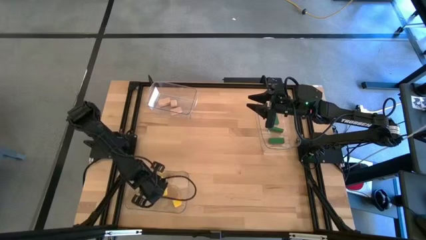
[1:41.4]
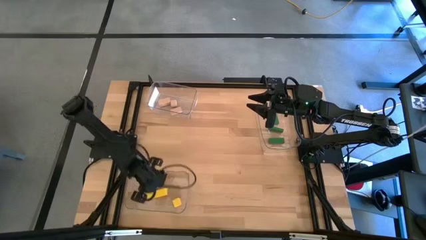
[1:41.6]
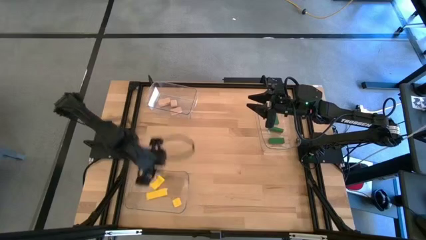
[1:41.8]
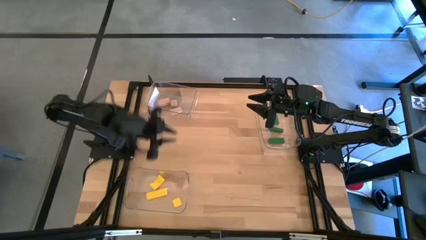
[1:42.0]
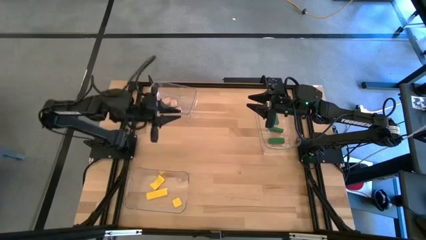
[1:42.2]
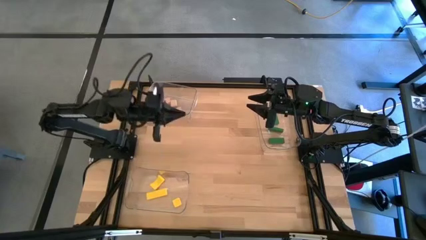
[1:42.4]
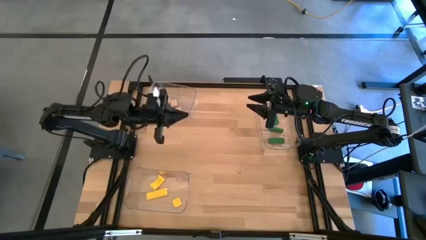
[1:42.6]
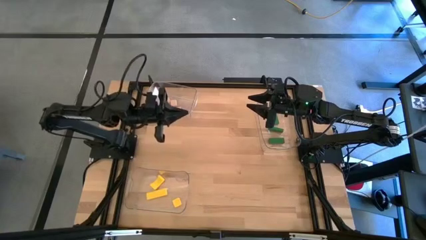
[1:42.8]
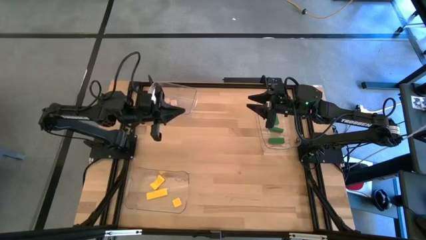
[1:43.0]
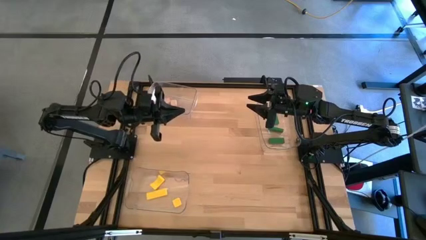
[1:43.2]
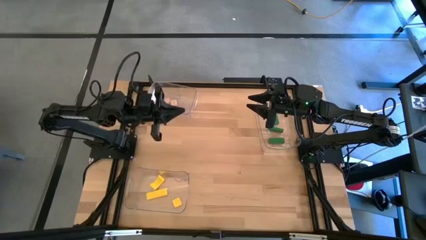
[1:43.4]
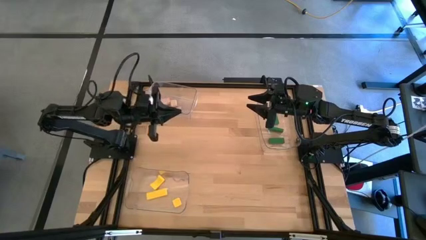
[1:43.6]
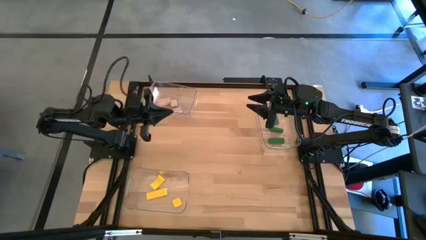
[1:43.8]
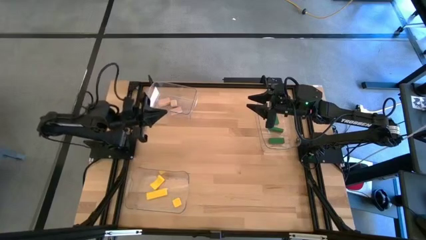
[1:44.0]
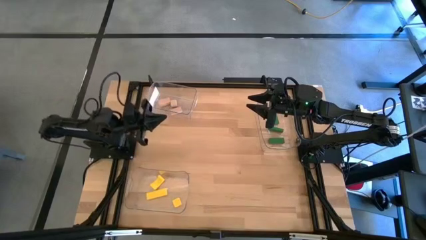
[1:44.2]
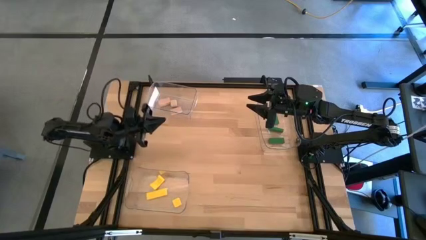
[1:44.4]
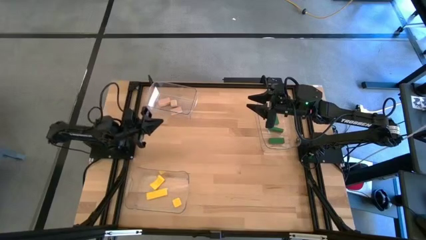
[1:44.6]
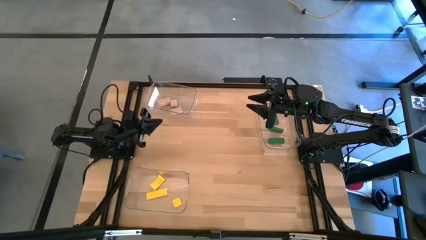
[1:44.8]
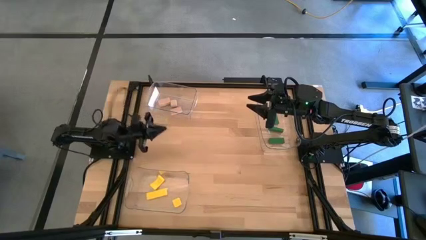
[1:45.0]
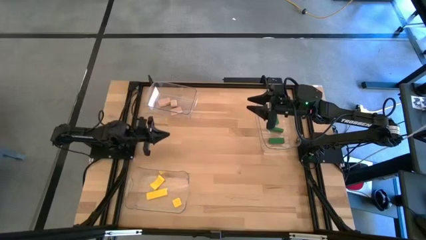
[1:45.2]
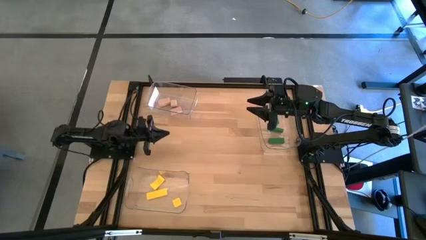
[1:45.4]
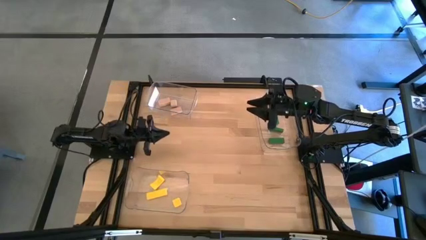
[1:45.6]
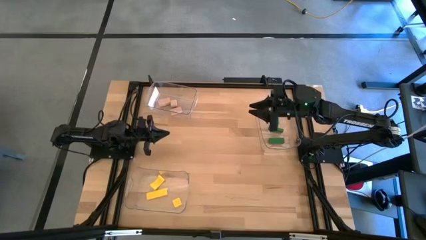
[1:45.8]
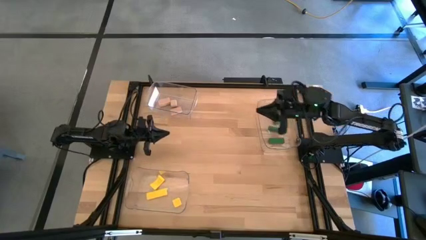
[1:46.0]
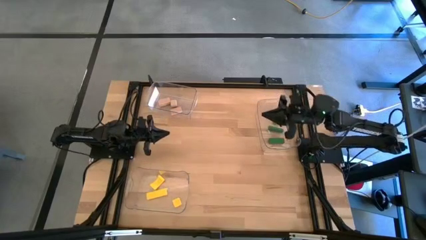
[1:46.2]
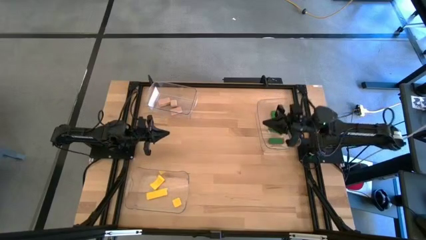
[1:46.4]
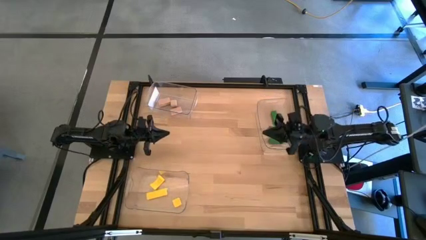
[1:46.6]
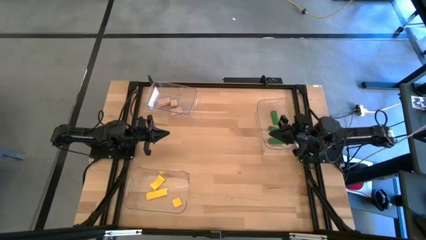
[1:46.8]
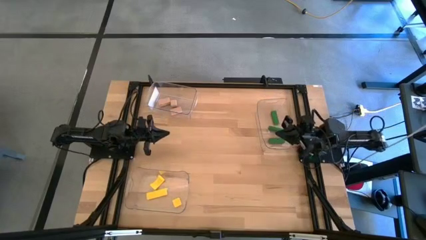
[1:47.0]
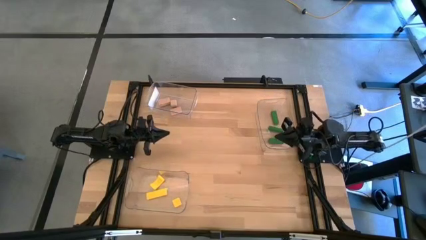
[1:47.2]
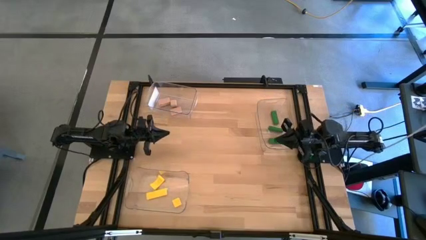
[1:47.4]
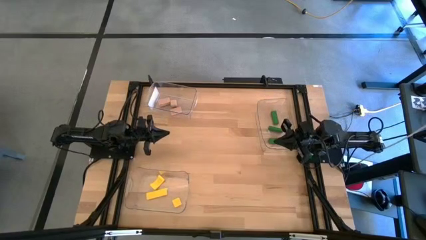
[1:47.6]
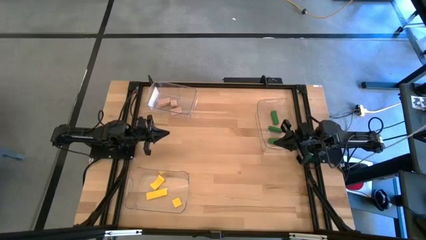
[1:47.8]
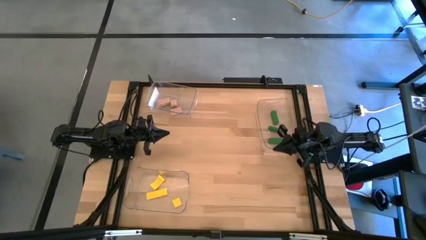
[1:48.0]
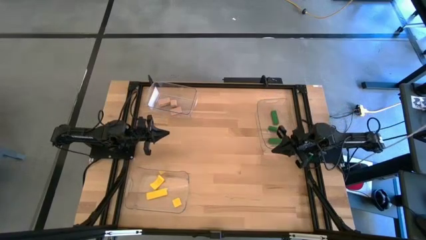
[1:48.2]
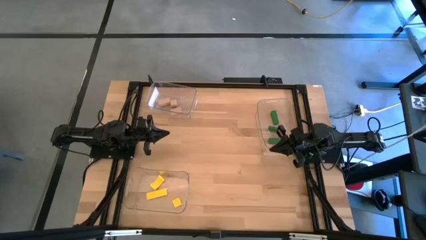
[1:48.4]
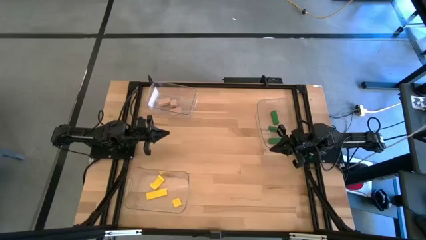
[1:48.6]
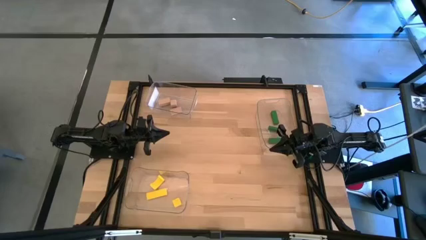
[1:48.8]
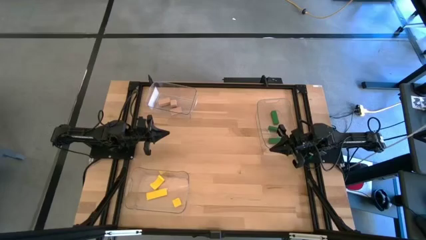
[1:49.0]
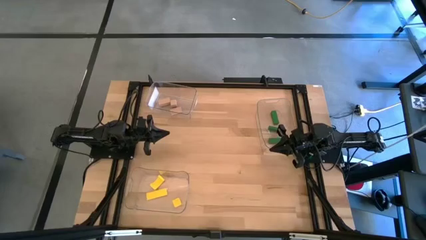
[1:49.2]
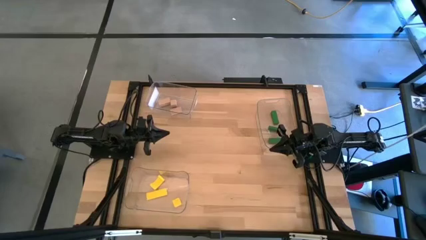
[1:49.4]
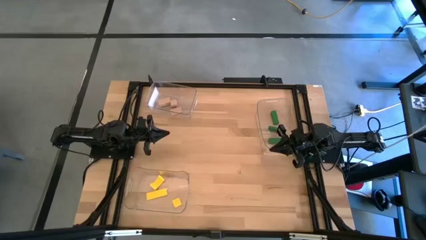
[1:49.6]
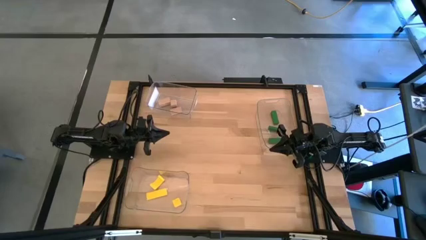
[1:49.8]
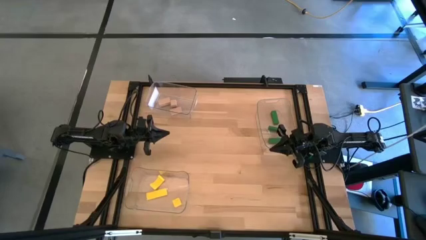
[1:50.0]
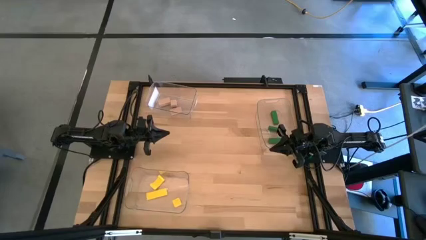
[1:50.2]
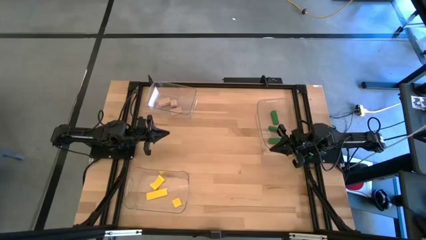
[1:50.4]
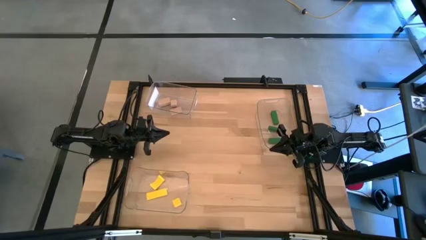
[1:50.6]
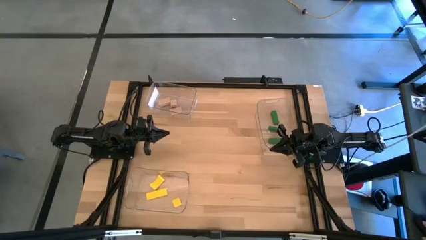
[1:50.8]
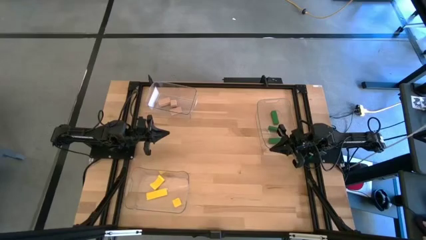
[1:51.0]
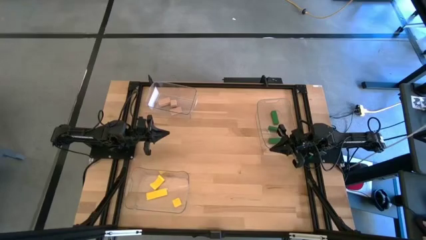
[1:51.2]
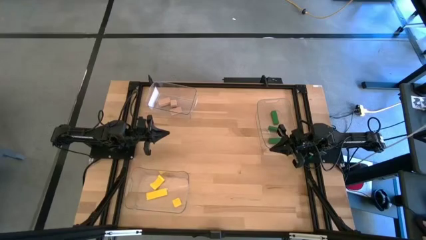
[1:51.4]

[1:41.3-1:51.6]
Task: Sort & place blocks by color
Return to Home Position

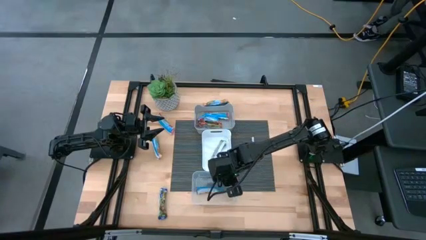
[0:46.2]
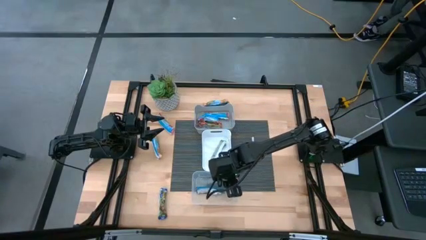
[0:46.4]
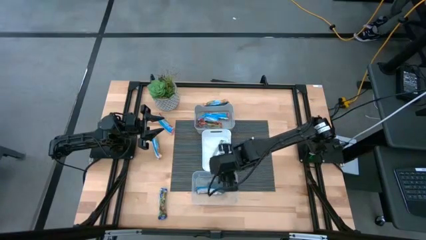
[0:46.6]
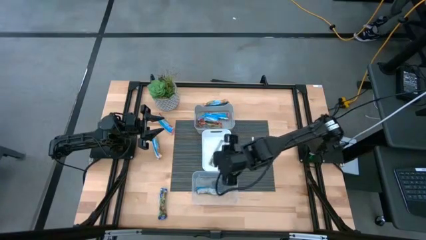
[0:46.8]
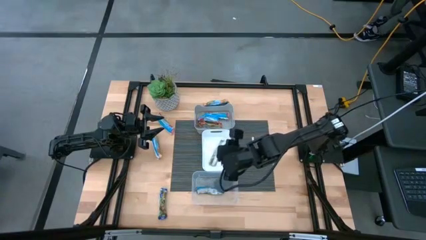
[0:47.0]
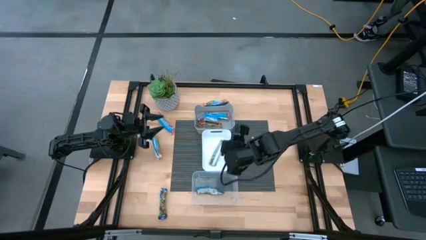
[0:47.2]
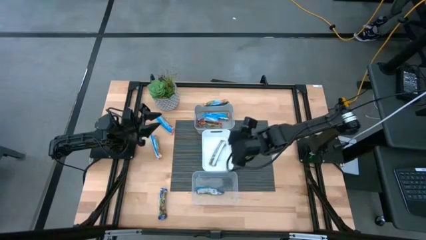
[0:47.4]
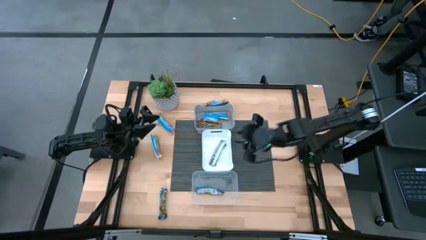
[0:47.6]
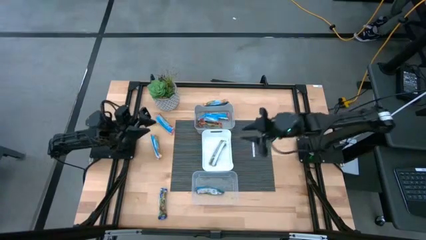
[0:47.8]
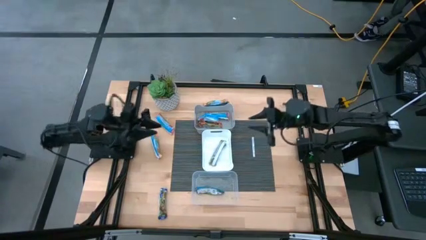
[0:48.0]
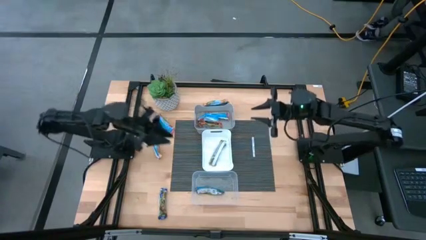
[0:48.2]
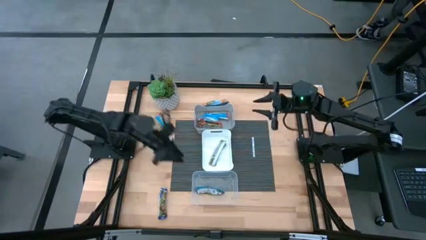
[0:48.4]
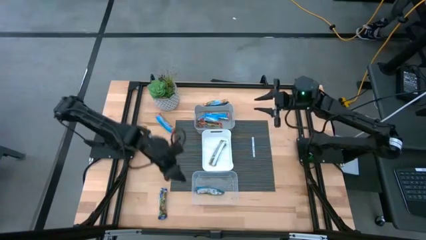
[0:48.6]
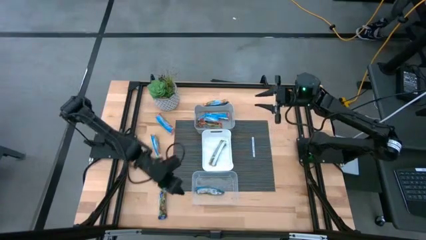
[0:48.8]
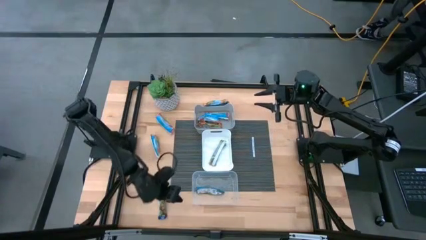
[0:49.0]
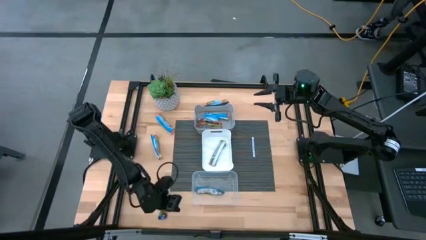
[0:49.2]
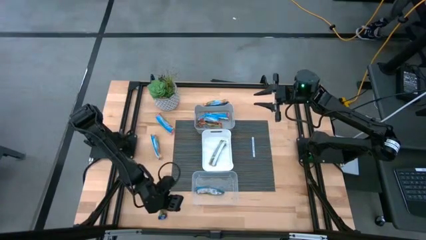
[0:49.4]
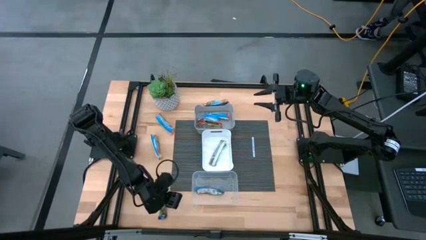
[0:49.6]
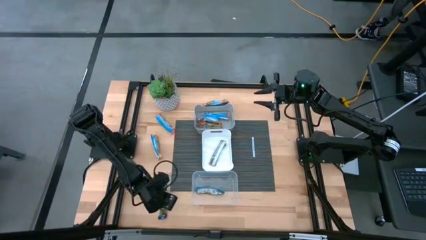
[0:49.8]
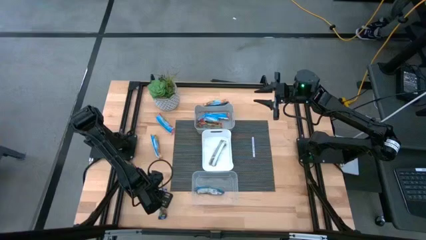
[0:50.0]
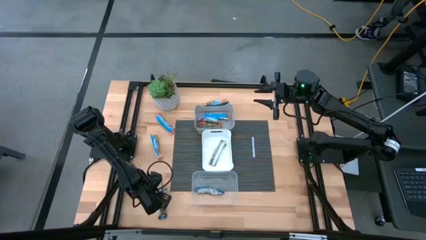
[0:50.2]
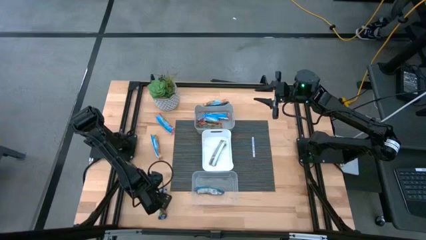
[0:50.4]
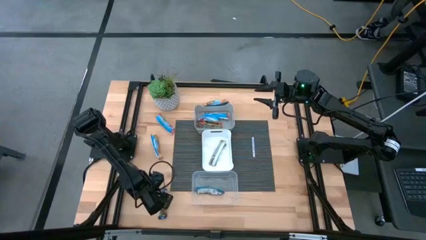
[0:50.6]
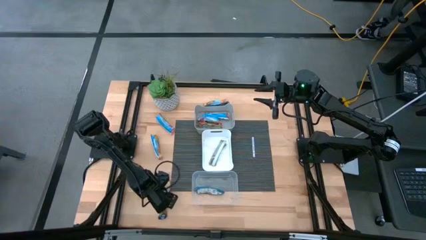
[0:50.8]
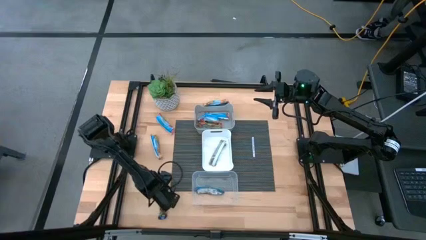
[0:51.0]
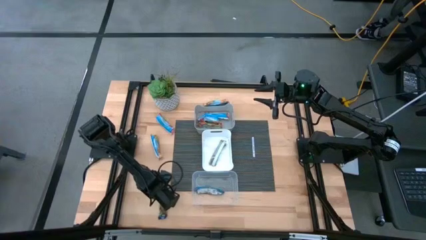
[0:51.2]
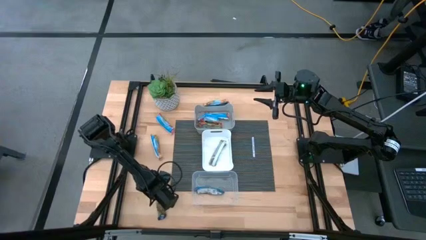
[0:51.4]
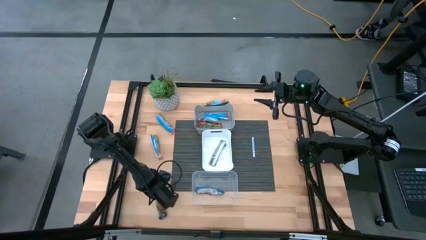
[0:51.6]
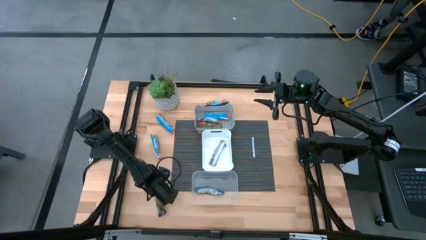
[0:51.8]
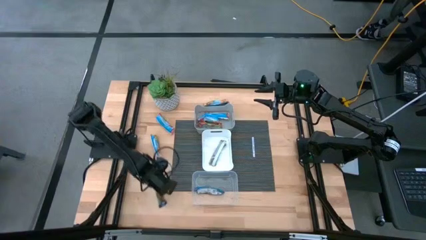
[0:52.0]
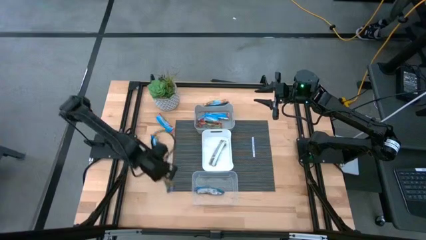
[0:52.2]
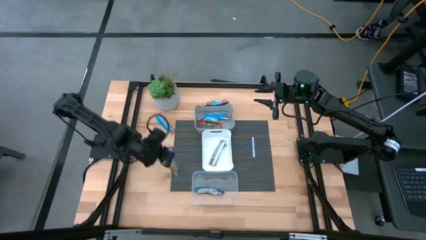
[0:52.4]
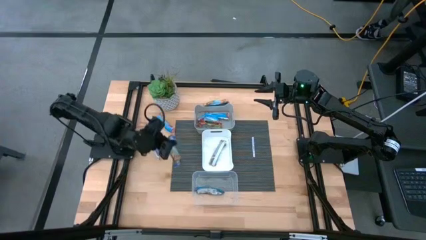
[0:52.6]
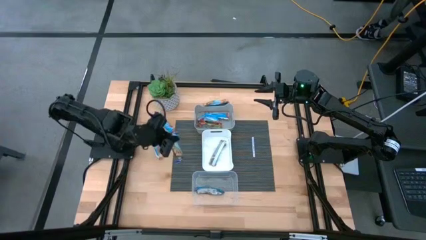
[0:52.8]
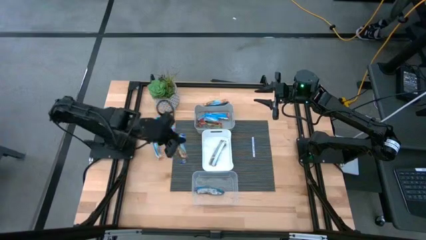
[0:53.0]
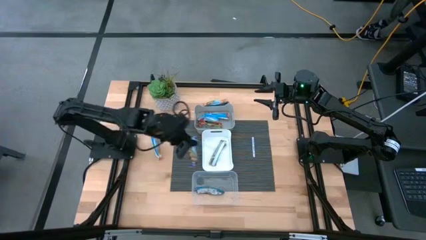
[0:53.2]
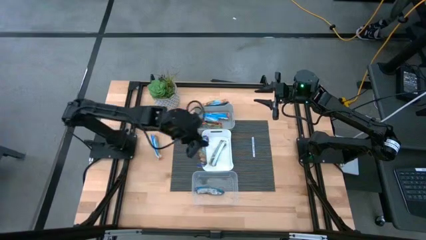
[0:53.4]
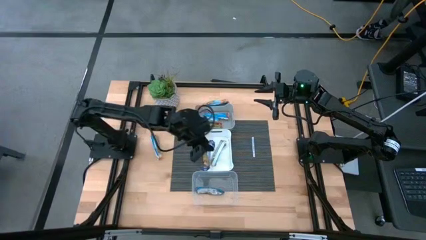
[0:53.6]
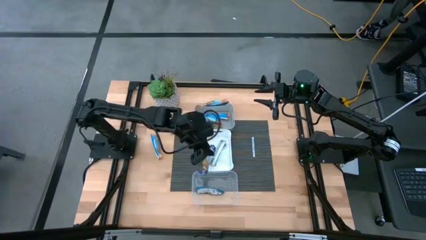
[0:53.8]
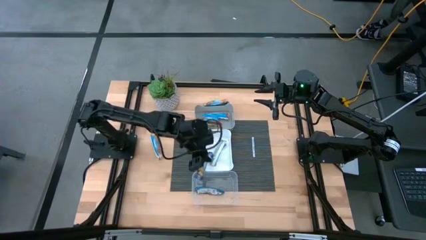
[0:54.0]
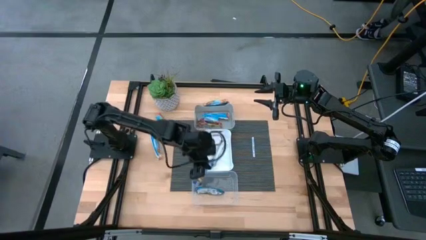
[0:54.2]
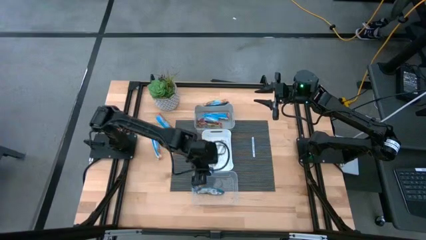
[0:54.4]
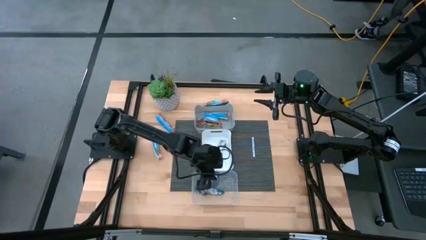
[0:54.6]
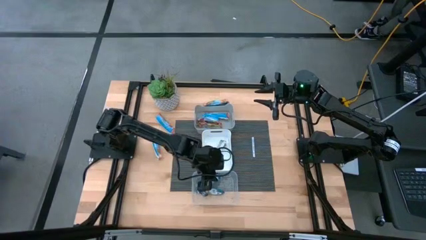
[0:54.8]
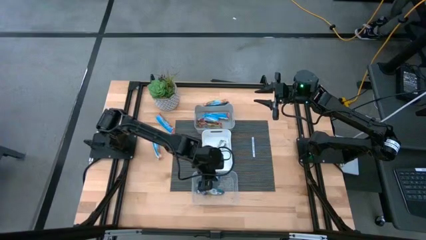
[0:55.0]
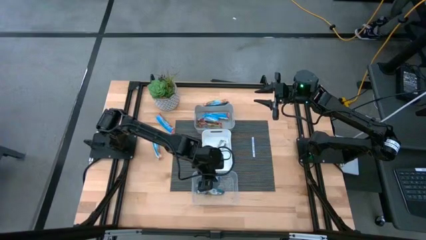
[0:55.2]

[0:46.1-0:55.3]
Task: Pick and place Granola Bars by type
Put the blue granola bar into the transparent bin
